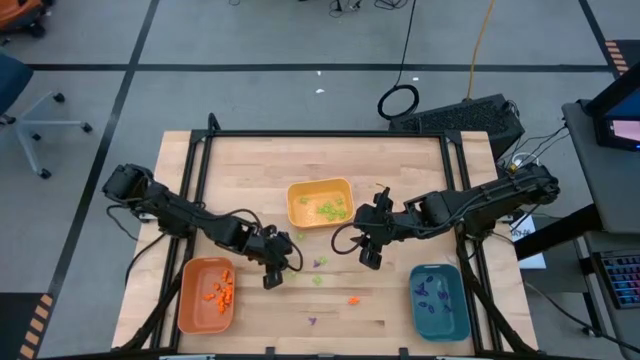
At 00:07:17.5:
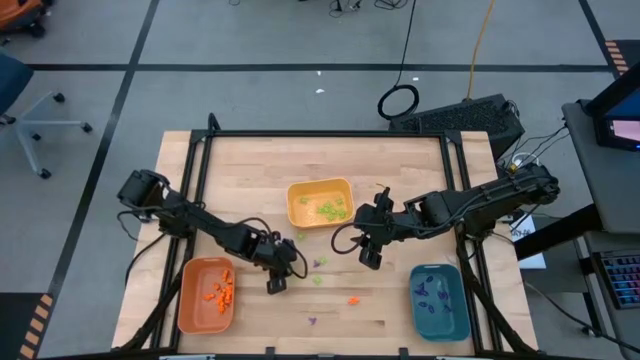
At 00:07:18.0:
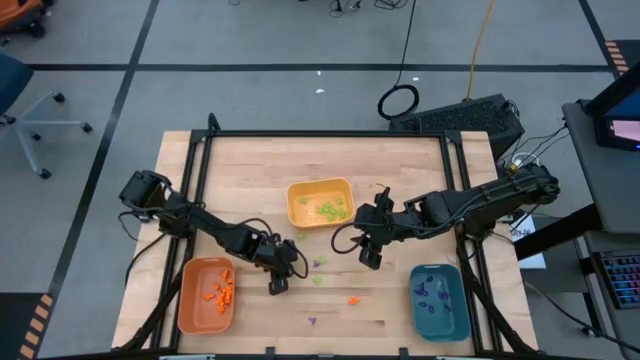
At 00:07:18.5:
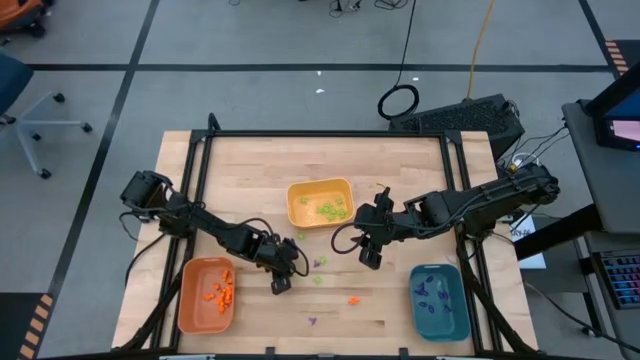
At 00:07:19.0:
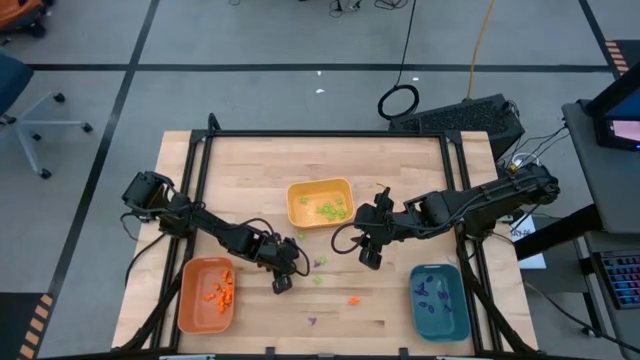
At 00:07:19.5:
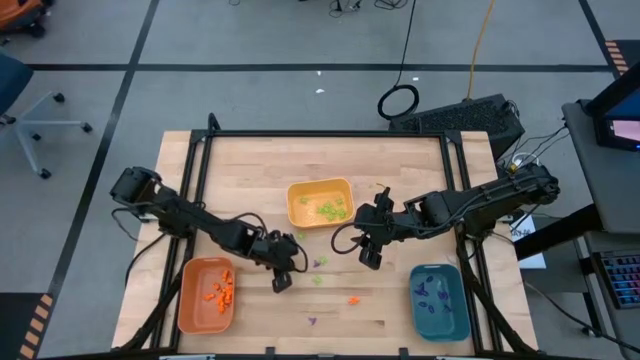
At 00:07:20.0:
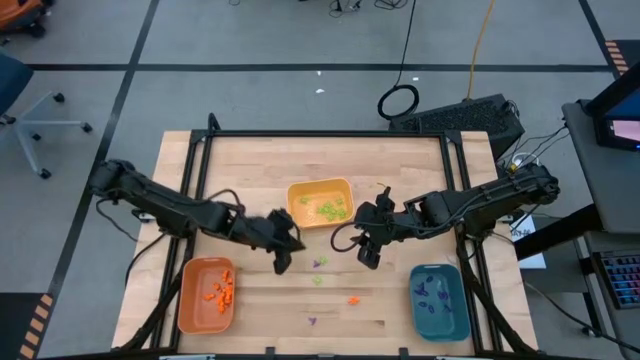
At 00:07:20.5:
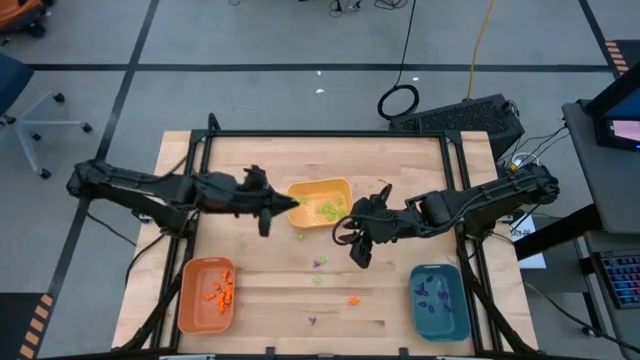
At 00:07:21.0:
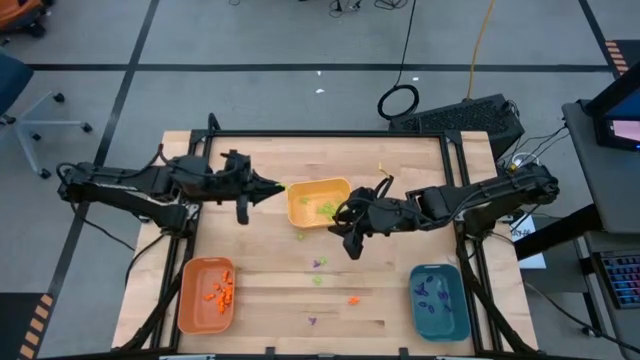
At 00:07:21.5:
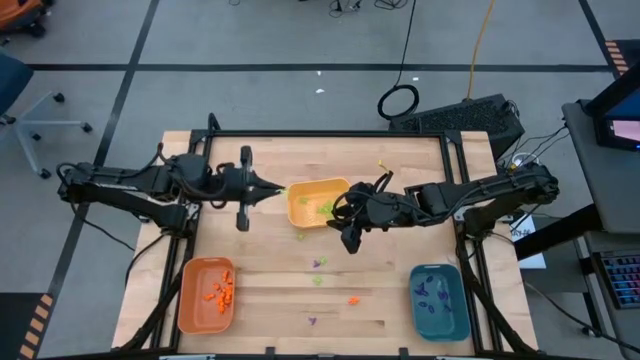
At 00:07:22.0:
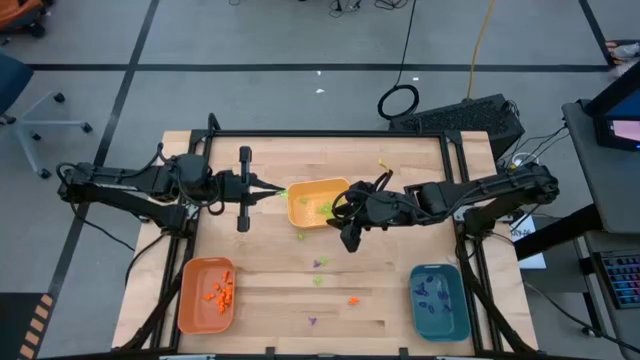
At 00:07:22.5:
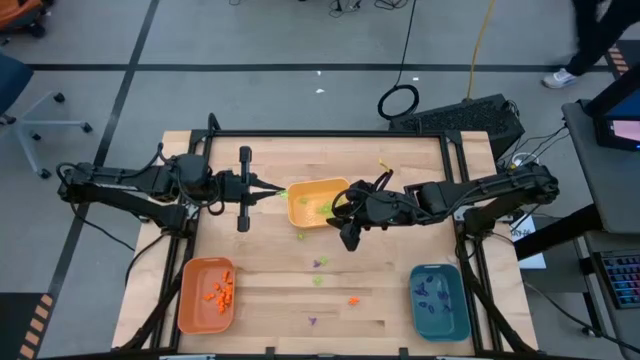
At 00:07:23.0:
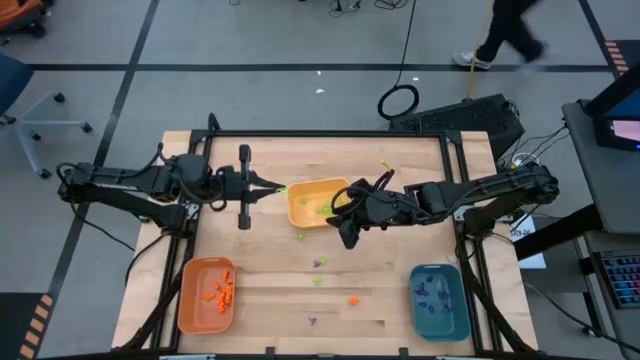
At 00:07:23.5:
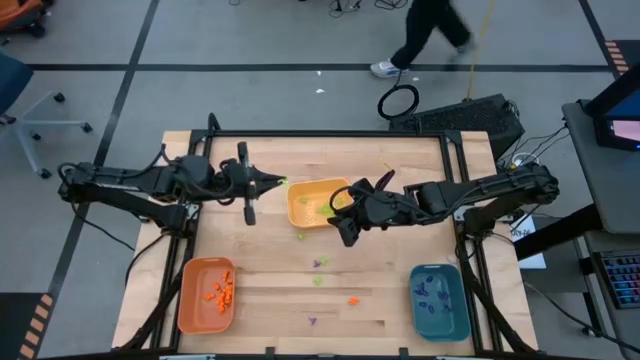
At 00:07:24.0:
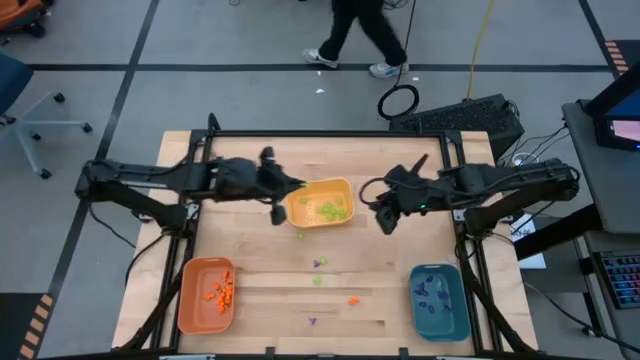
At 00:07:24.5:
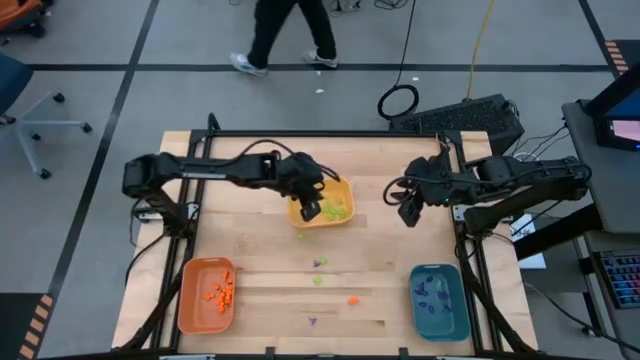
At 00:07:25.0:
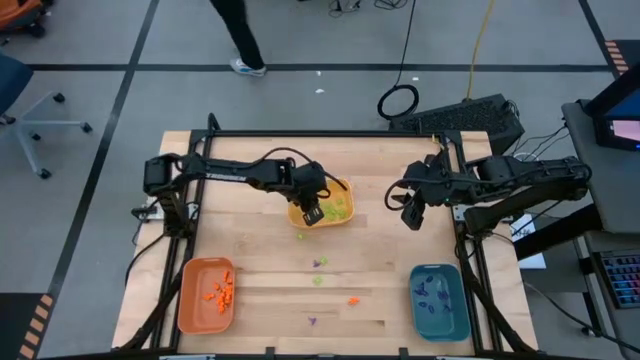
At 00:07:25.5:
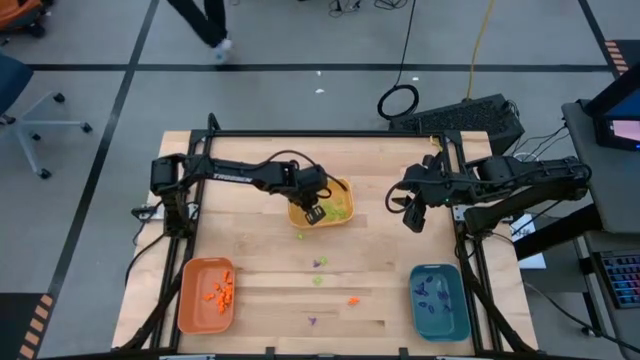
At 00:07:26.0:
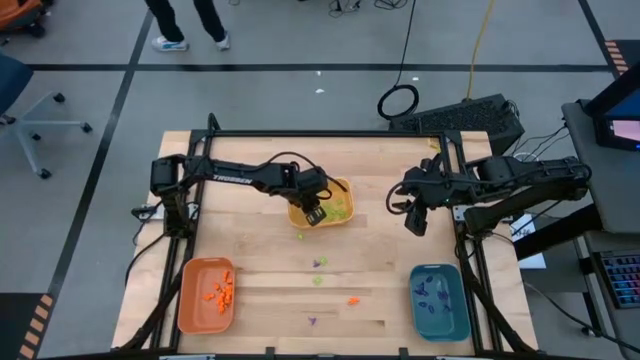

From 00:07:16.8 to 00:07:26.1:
Task: Sort Halloween decoration
Put the green spider toy into the yellow bin

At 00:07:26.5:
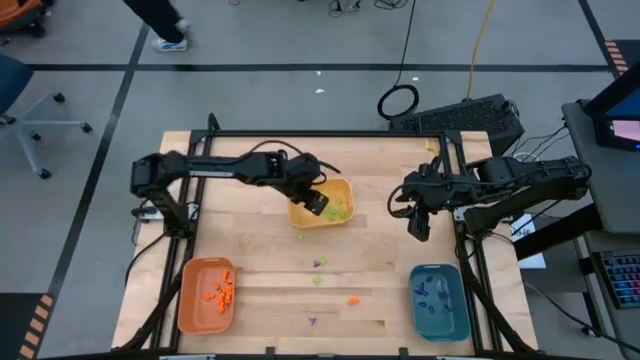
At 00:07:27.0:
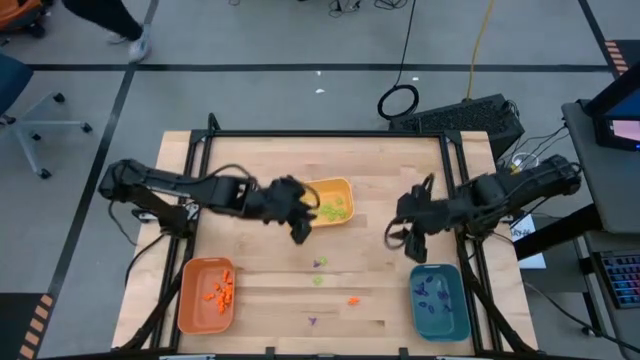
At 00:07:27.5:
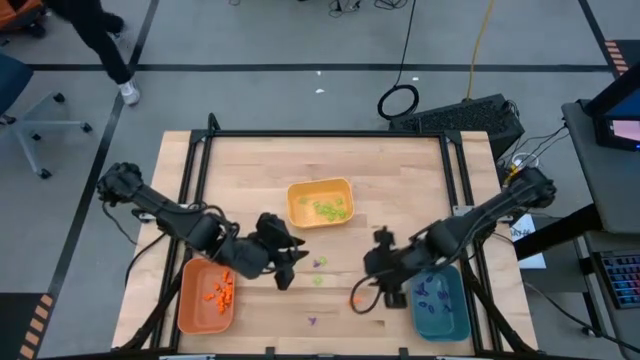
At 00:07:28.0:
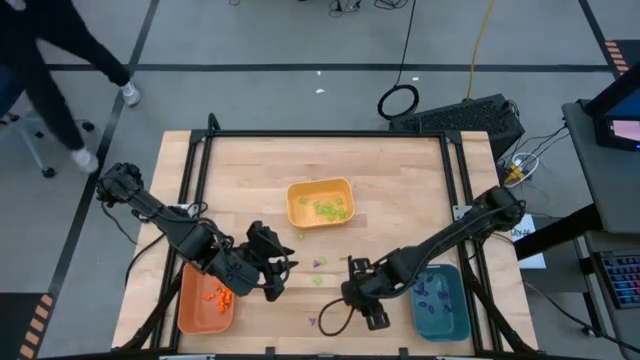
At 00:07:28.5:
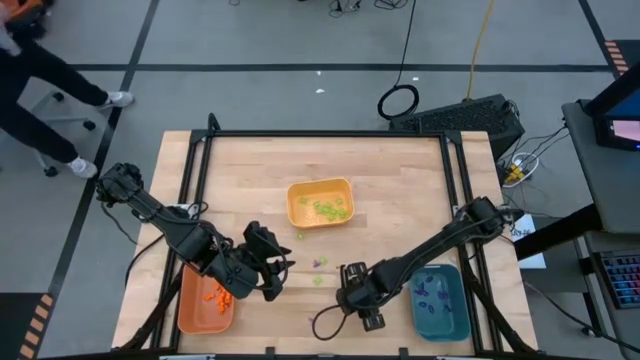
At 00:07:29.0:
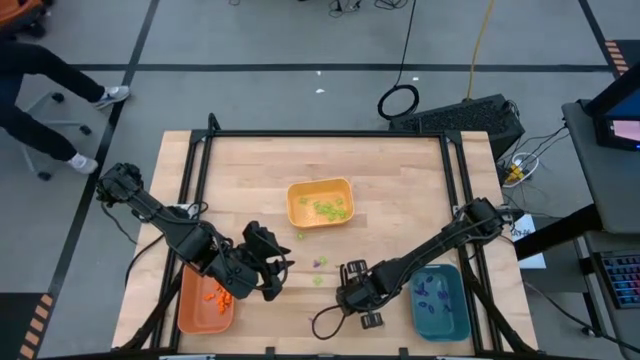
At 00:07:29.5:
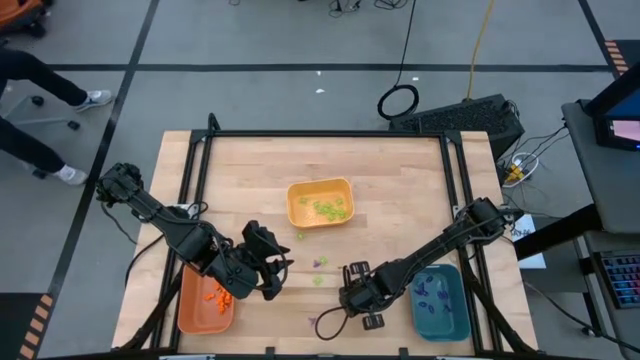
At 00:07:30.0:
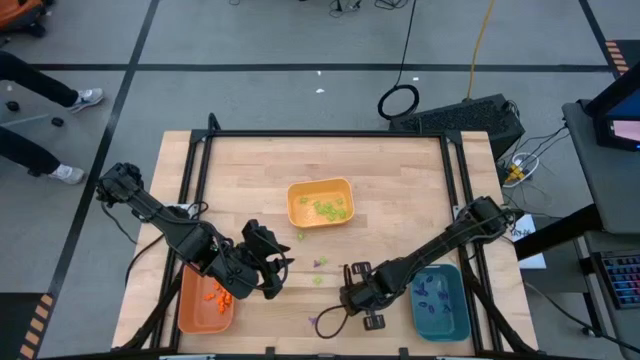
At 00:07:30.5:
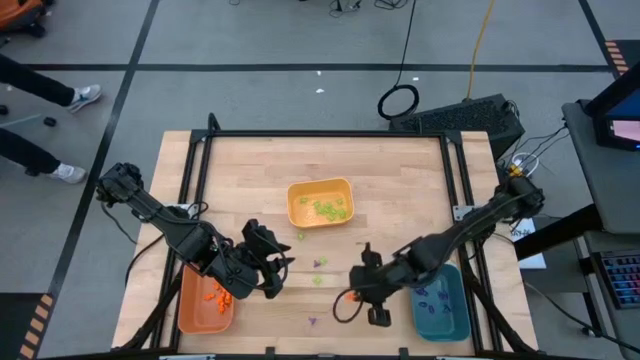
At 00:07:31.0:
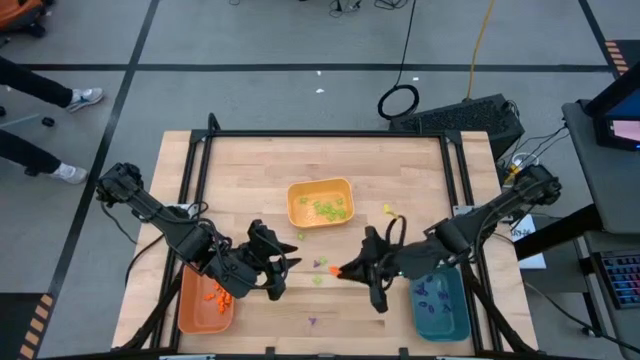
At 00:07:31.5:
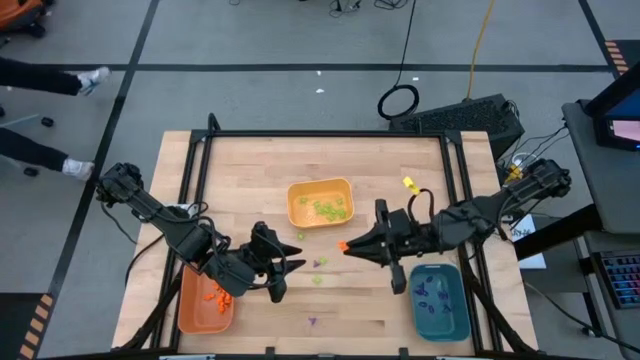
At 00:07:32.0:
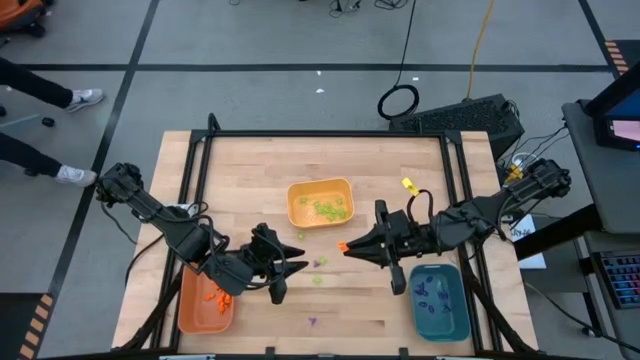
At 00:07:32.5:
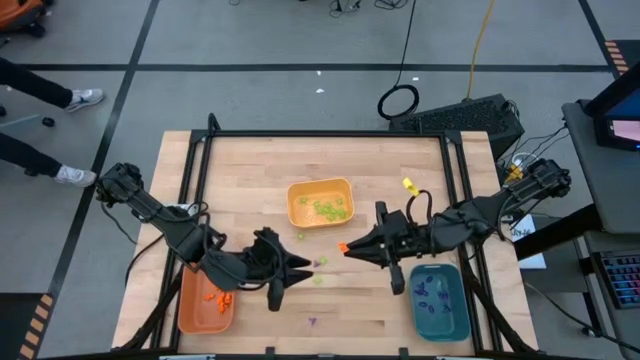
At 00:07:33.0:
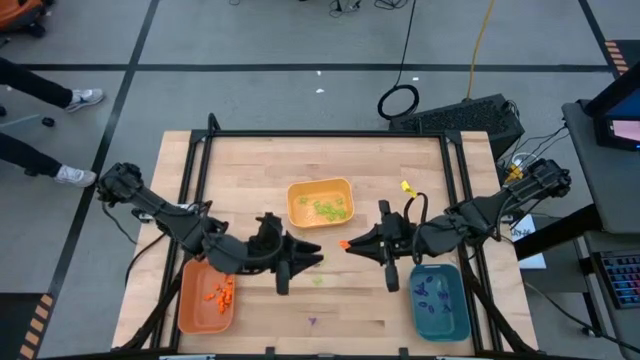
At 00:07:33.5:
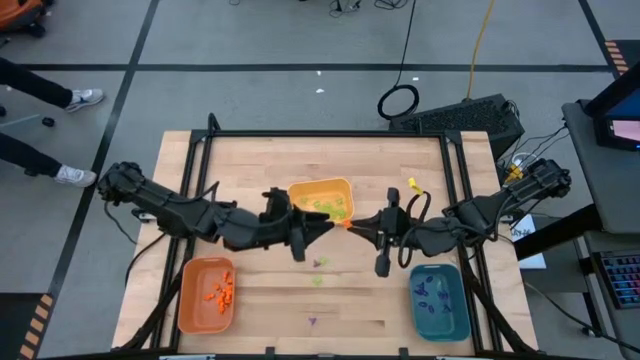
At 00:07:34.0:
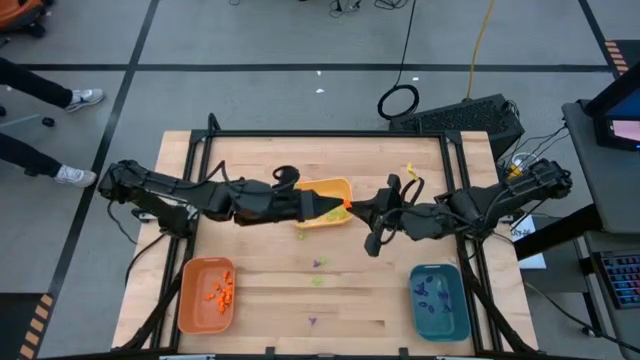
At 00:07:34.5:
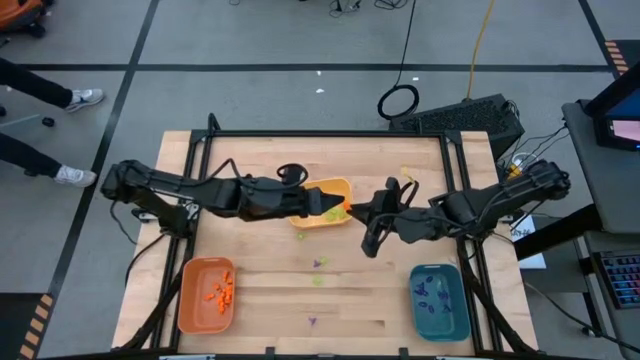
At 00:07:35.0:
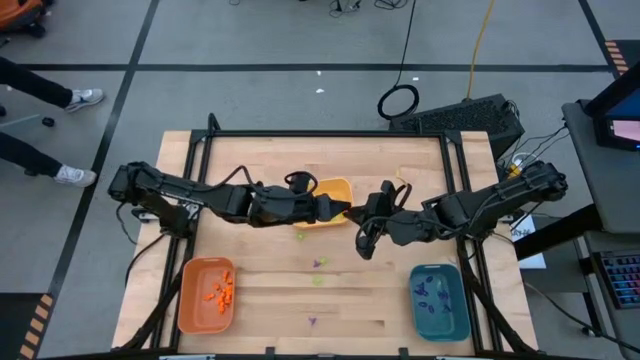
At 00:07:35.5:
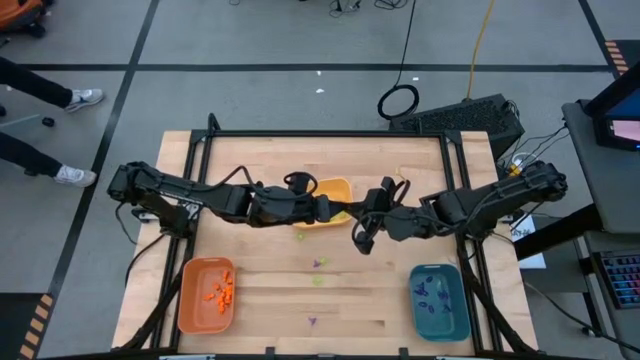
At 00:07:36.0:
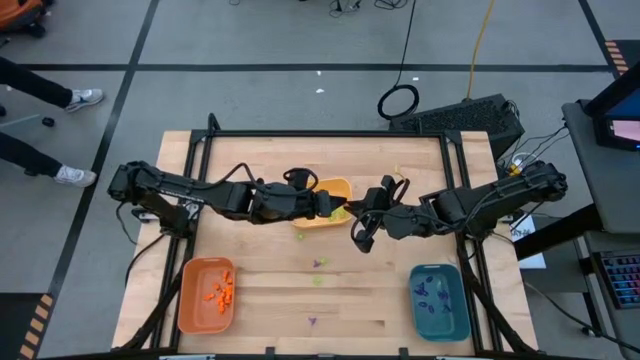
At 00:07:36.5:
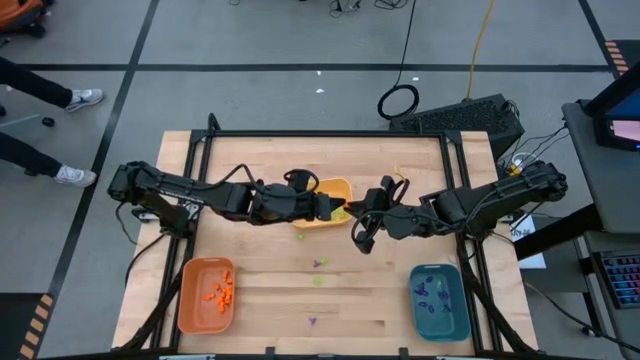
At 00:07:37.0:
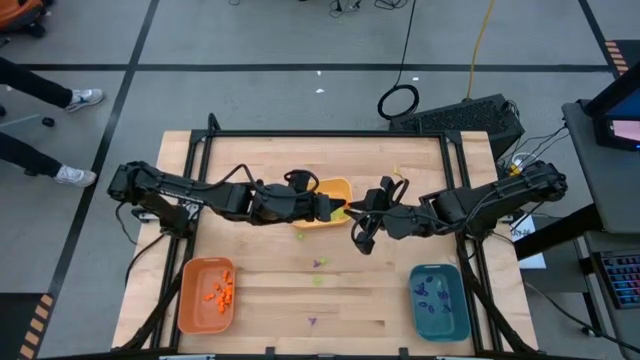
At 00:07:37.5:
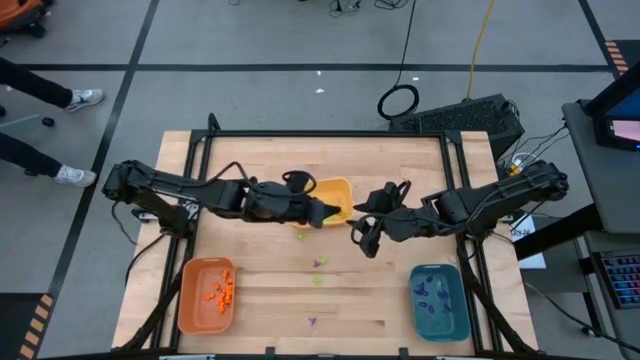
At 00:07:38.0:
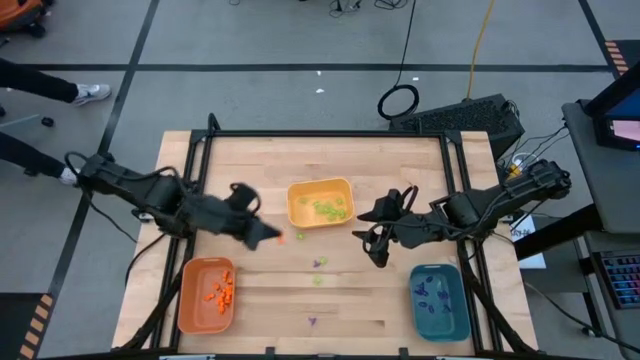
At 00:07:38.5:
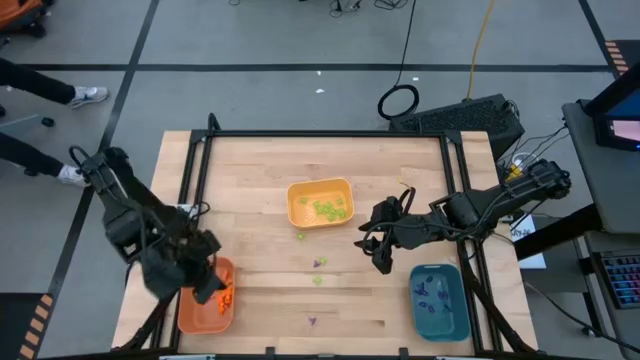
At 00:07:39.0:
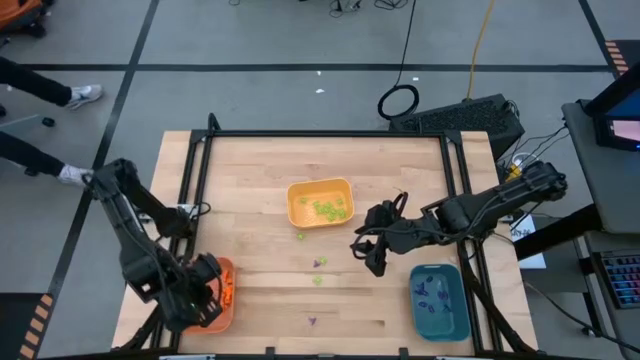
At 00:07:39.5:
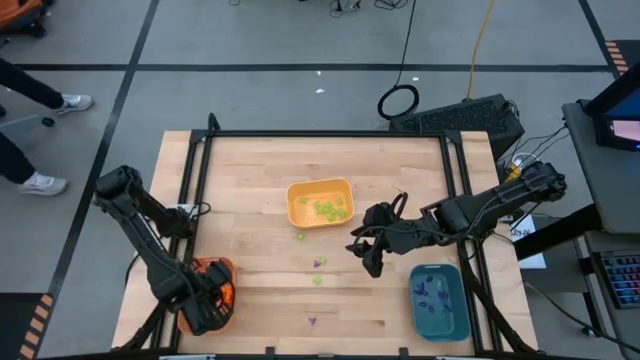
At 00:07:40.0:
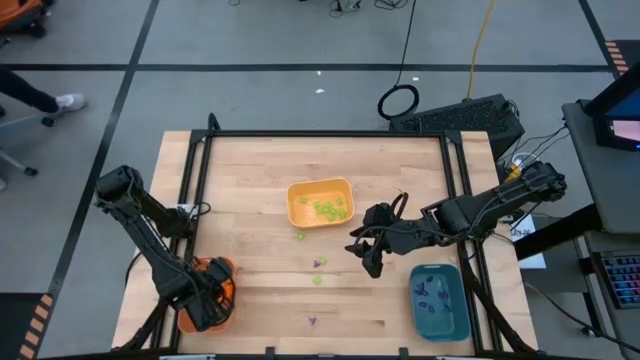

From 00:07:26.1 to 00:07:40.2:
Put the orange skeleton toy into the orange bin
